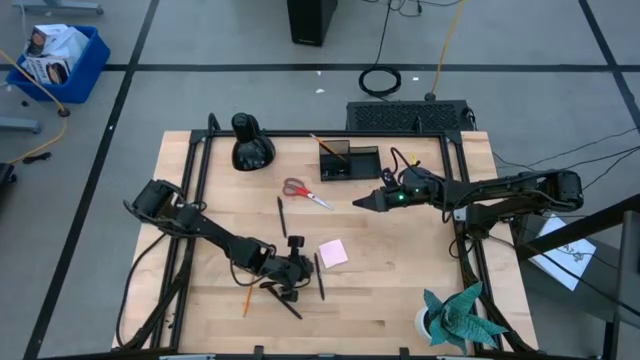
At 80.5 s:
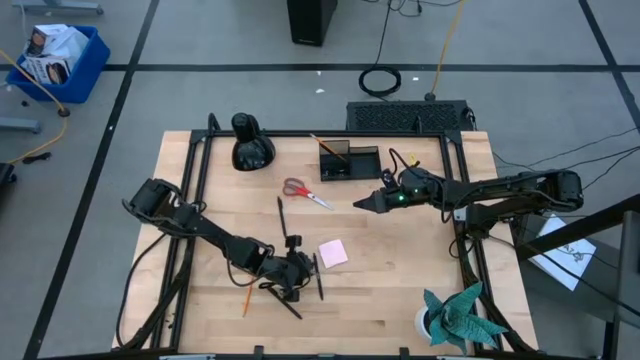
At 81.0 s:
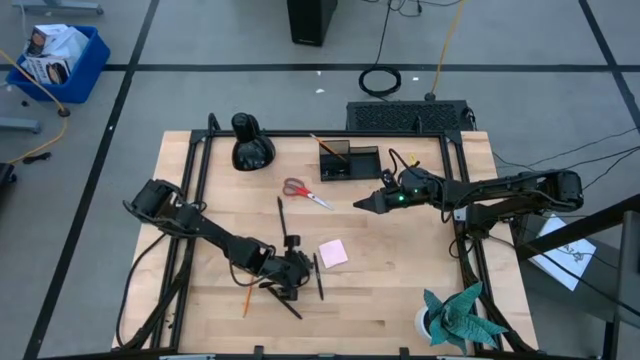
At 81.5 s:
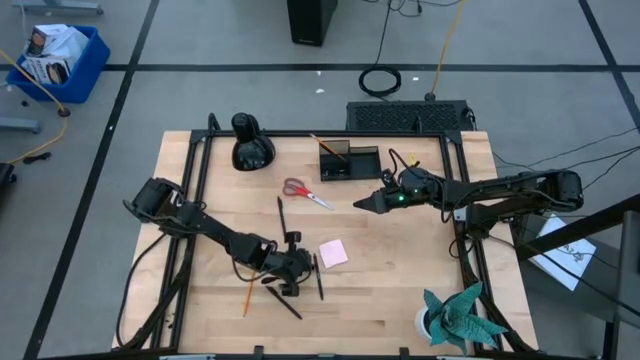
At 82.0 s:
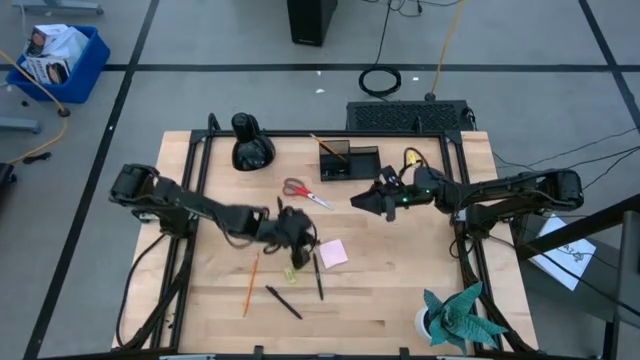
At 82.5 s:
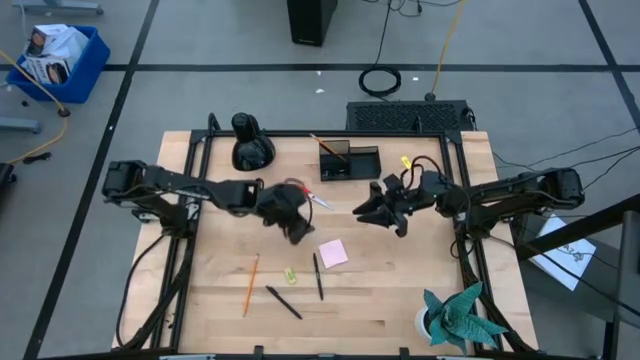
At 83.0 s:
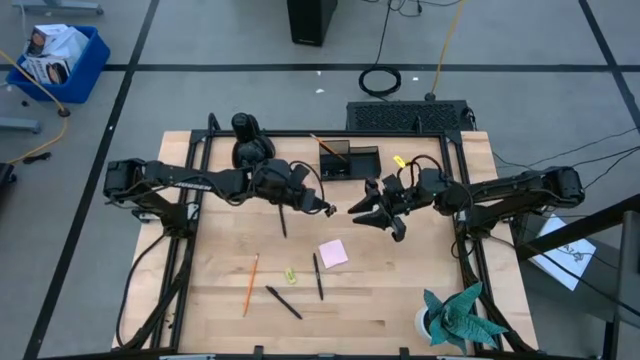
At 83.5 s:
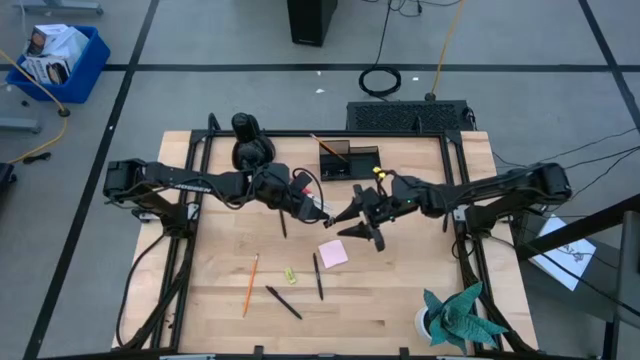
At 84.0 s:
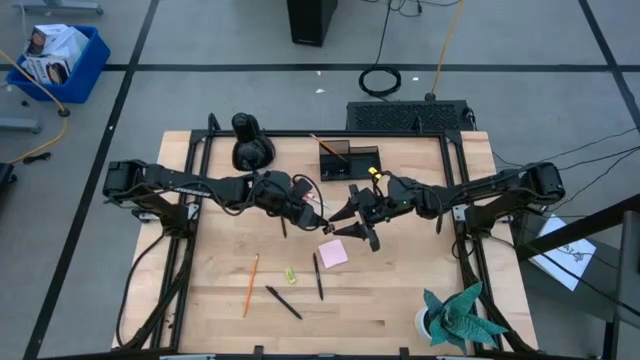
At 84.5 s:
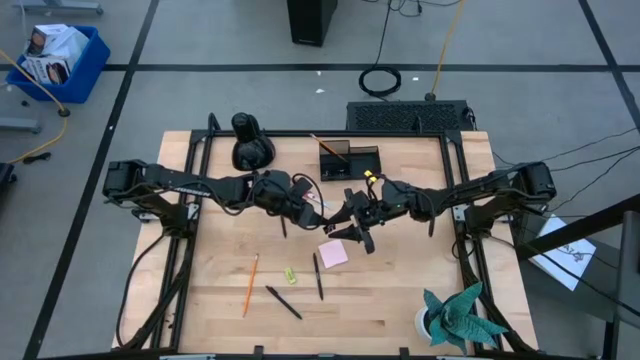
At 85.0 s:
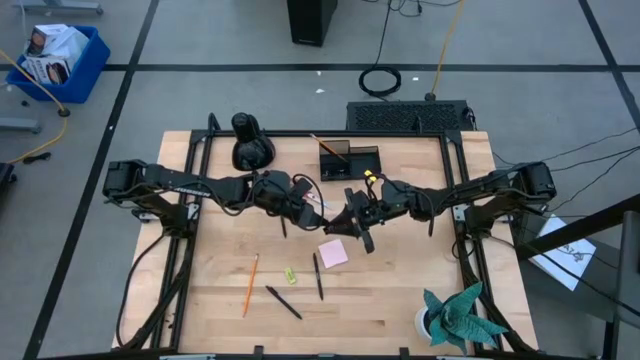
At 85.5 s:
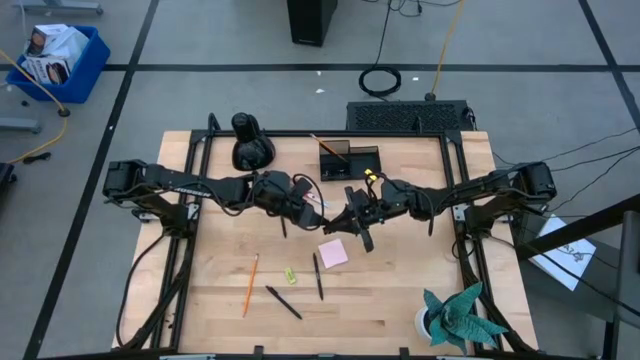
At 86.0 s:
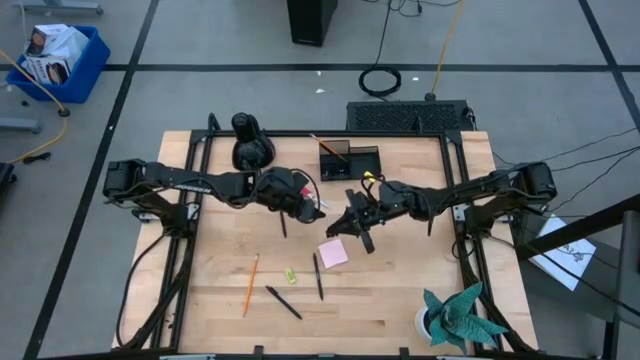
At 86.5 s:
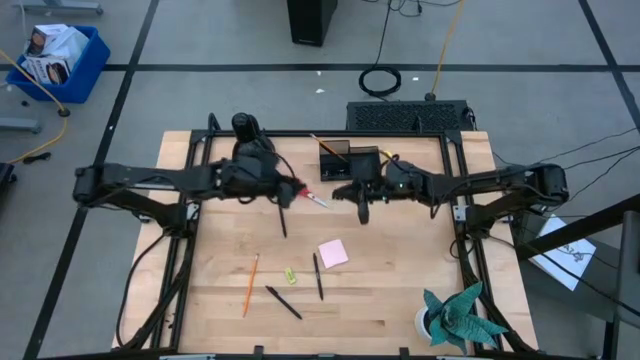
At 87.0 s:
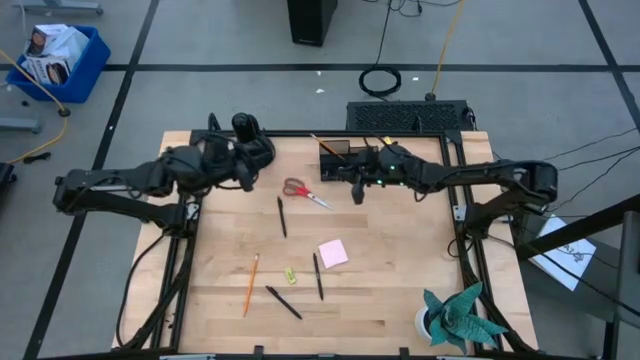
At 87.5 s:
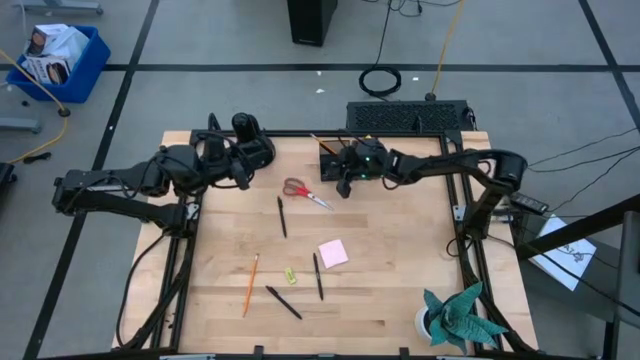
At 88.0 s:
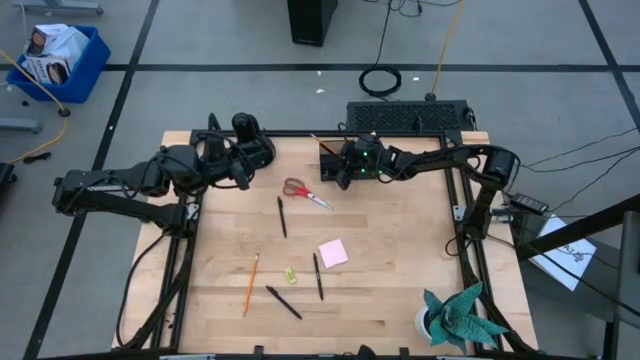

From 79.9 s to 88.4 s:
Task: Pick and place office supplies into organizer
Put the black binder clip into the black desk organizer

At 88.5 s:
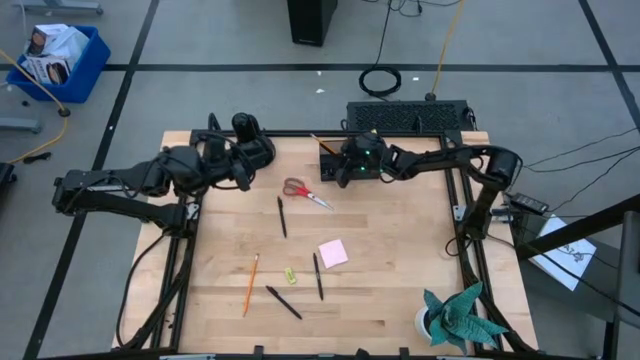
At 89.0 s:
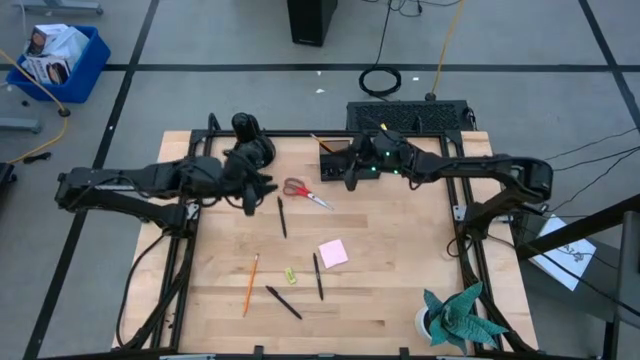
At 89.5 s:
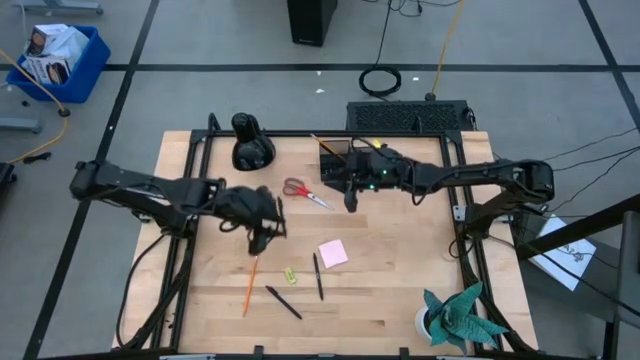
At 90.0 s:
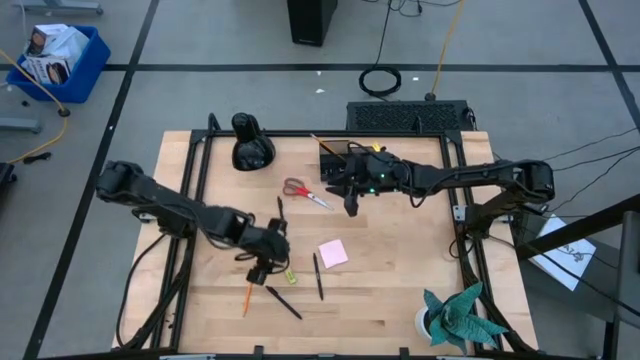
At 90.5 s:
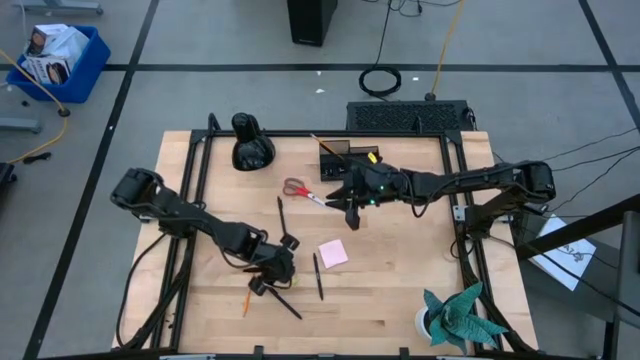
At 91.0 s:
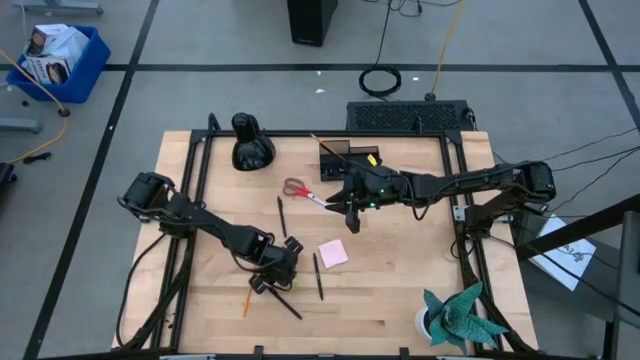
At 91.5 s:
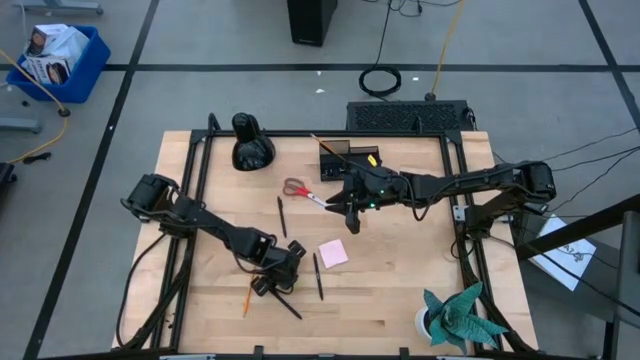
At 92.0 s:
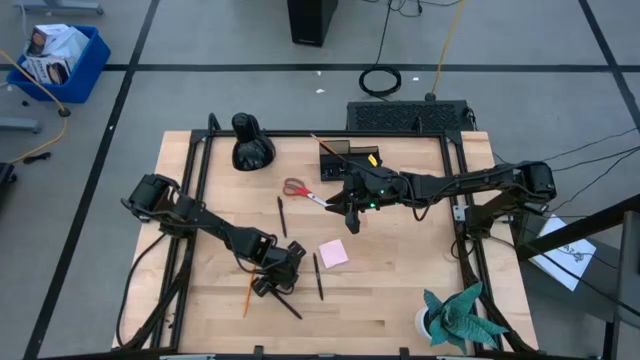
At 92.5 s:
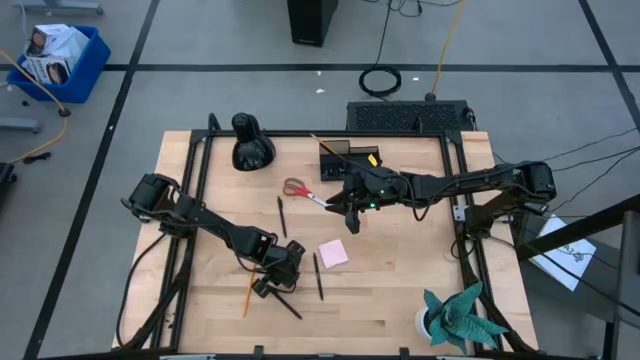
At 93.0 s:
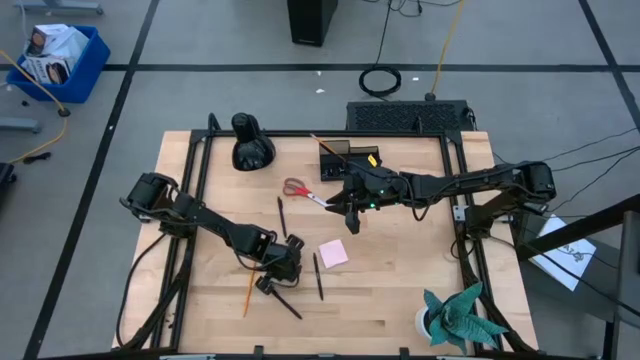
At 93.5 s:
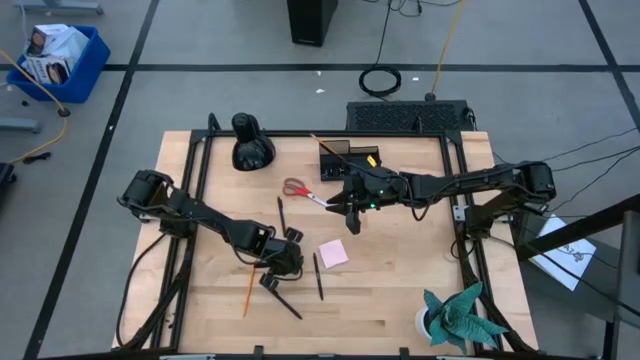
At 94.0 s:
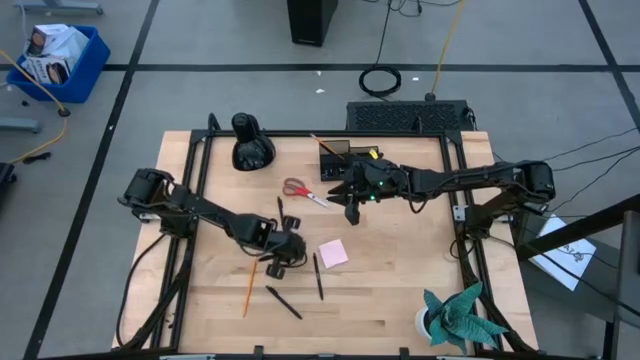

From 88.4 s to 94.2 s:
Put the green eraser into the black desk organizer

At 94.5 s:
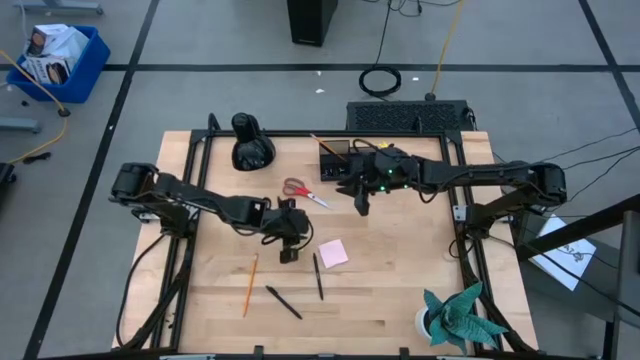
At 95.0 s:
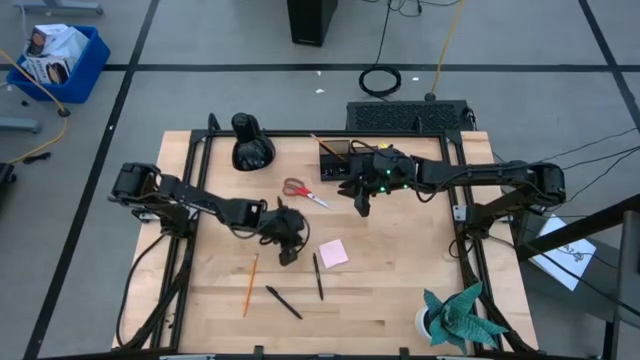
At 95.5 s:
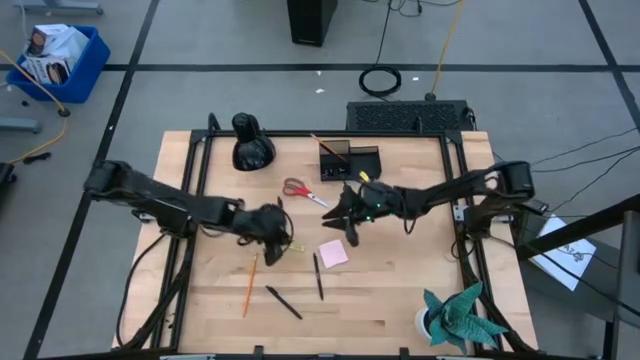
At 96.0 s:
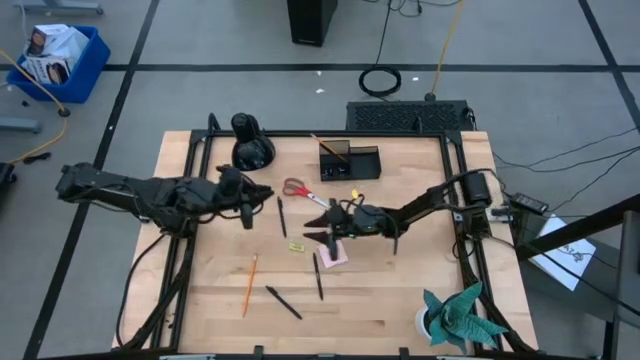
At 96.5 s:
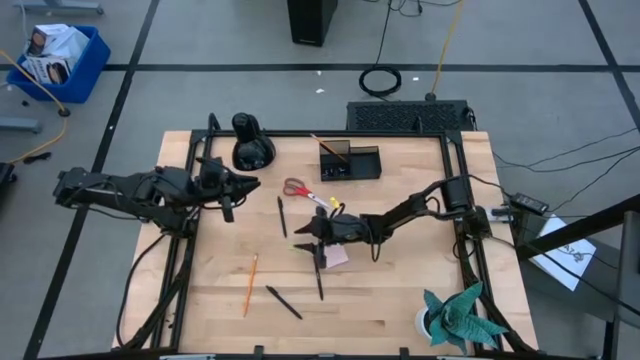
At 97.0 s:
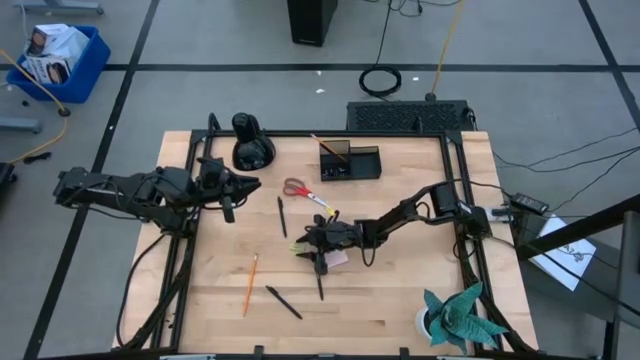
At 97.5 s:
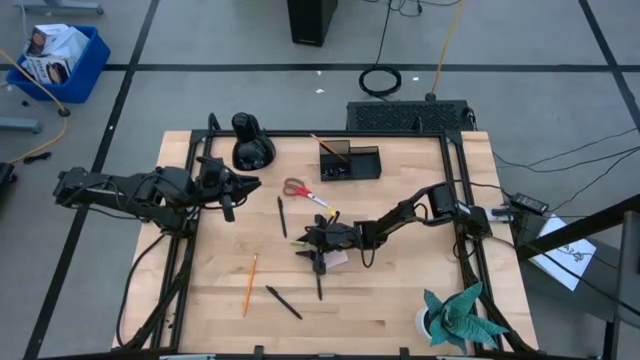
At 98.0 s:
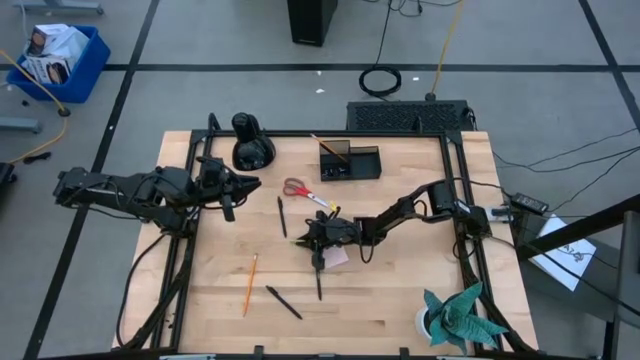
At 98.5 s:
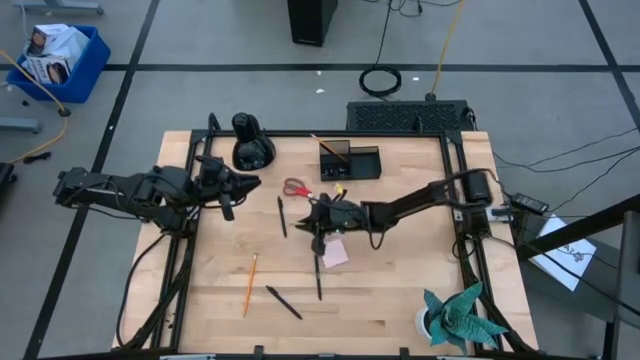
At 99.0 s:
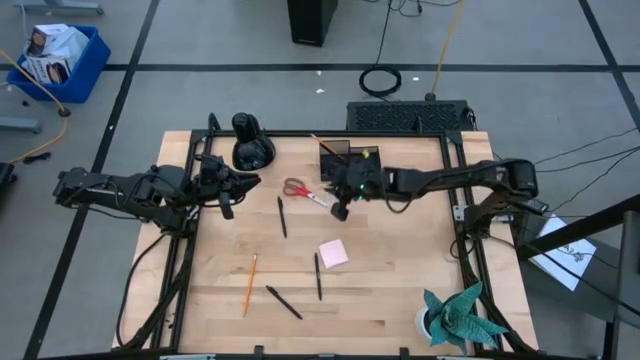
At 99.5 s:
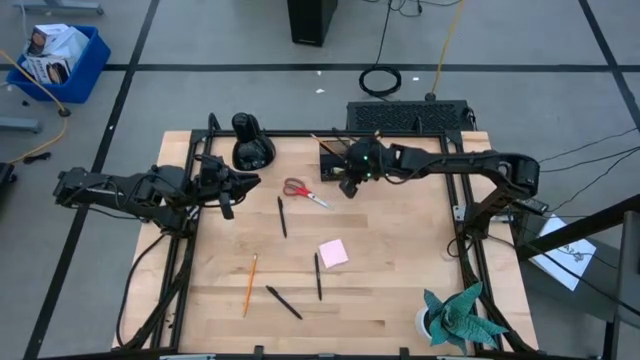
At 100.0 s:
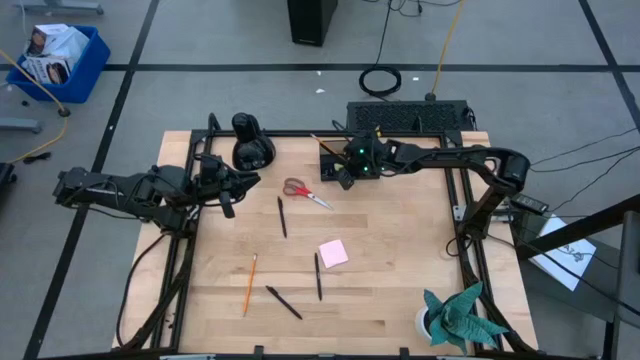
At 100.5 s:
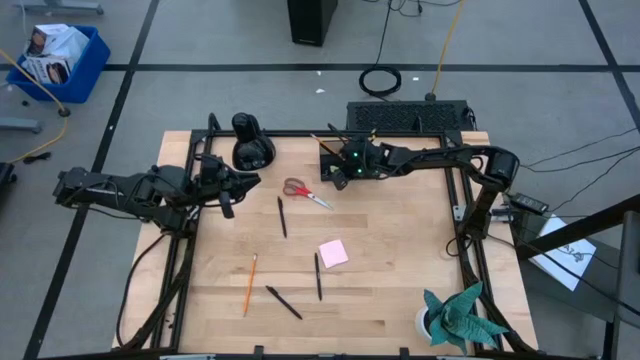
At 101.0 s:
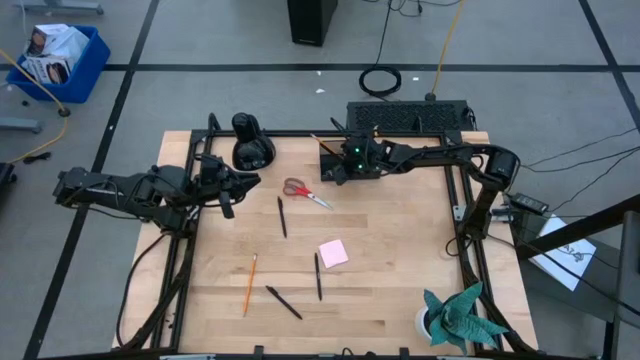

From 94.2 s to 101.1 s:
Put the yellow eraser into the black desk organizer
